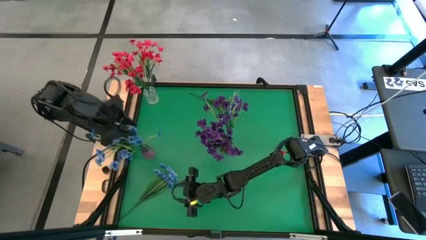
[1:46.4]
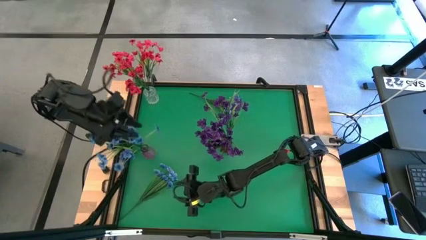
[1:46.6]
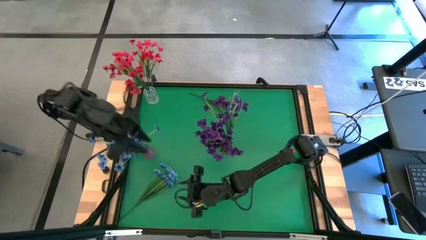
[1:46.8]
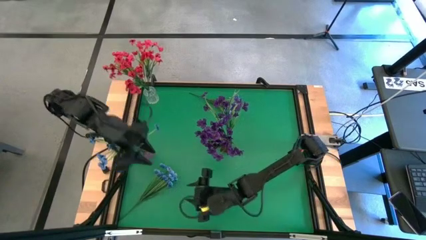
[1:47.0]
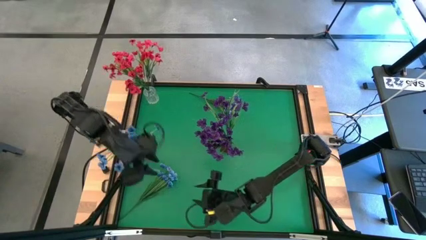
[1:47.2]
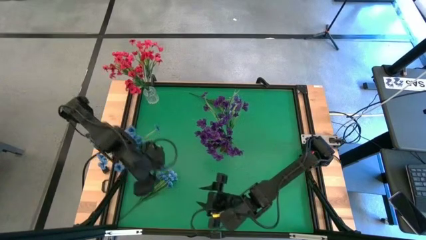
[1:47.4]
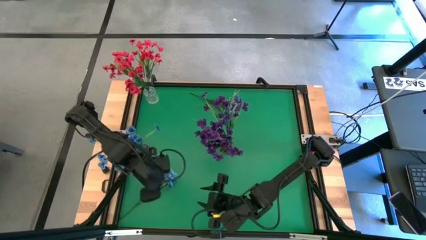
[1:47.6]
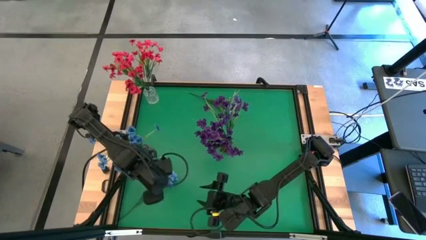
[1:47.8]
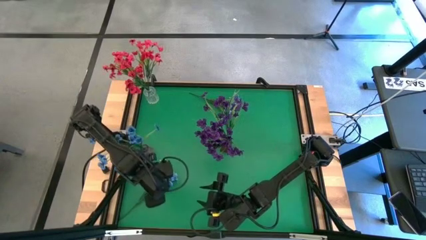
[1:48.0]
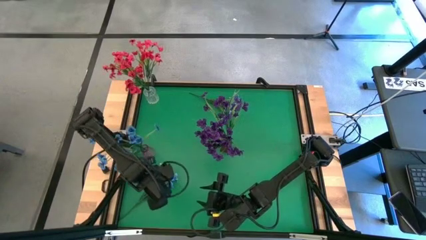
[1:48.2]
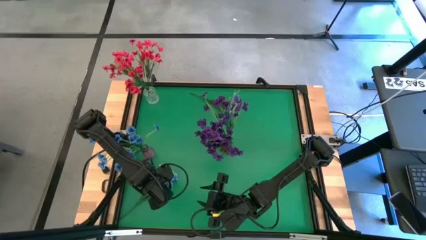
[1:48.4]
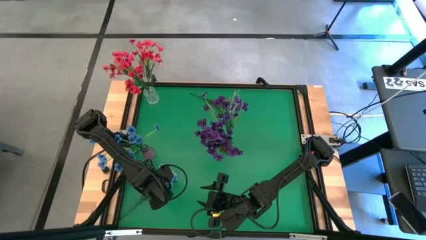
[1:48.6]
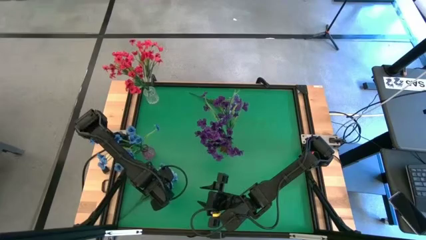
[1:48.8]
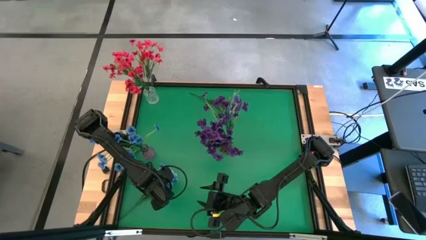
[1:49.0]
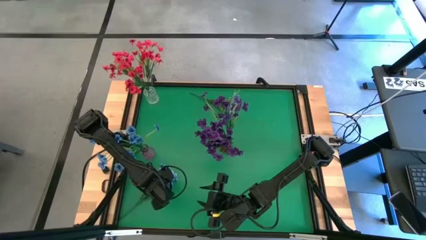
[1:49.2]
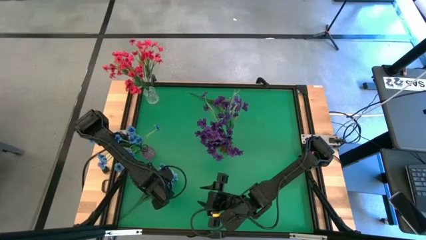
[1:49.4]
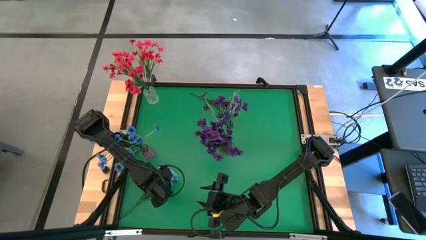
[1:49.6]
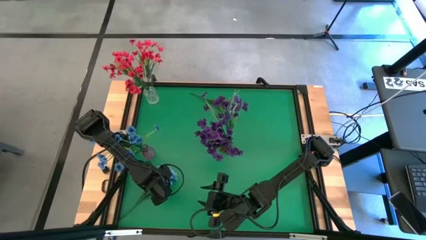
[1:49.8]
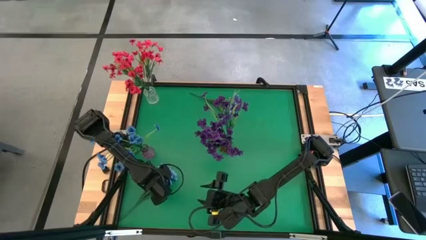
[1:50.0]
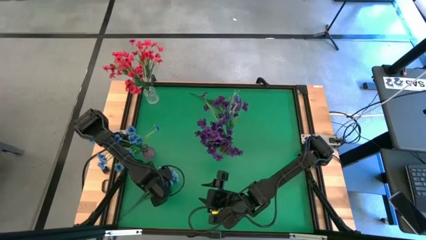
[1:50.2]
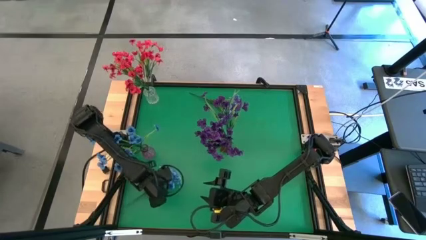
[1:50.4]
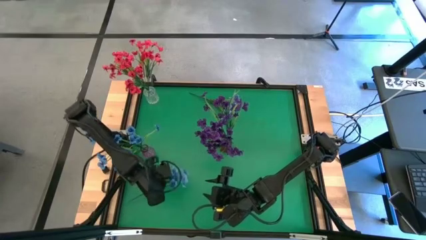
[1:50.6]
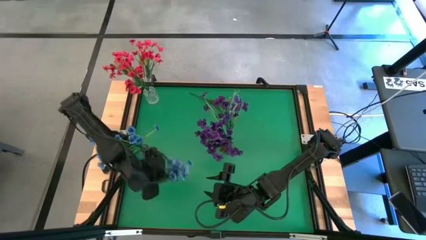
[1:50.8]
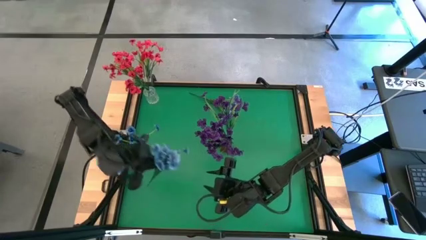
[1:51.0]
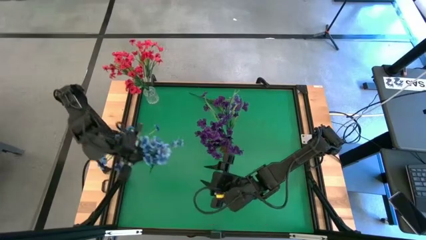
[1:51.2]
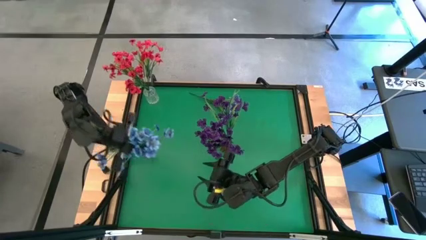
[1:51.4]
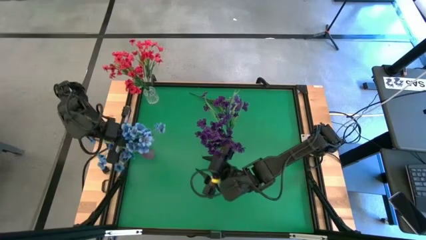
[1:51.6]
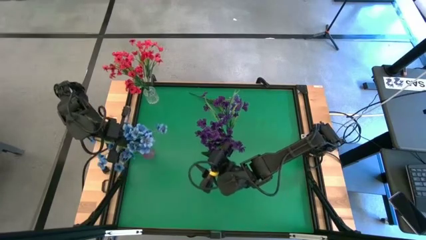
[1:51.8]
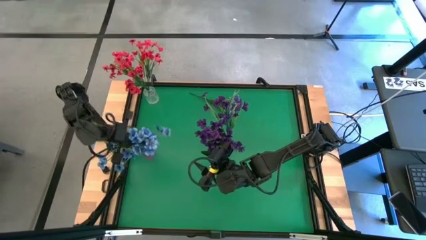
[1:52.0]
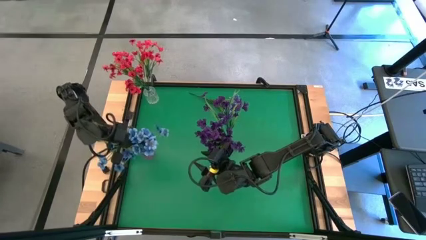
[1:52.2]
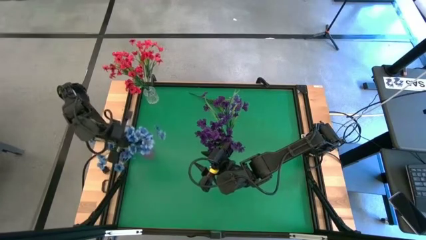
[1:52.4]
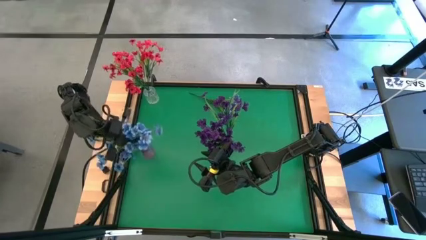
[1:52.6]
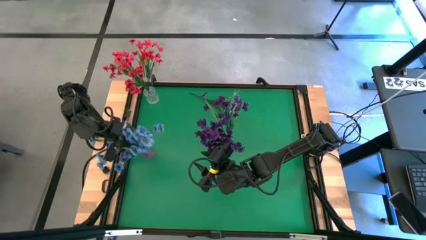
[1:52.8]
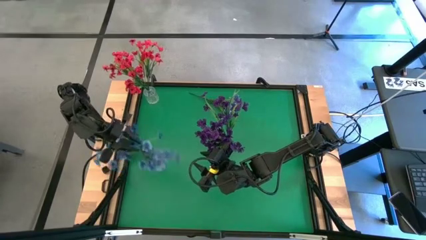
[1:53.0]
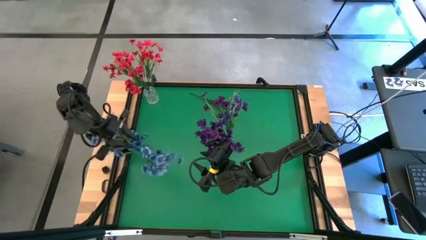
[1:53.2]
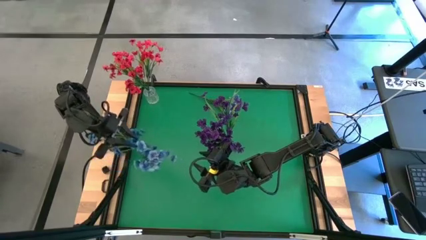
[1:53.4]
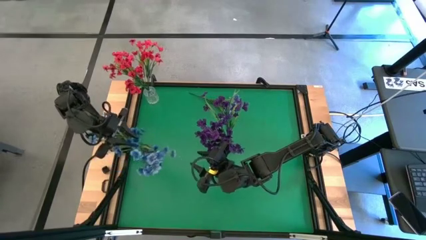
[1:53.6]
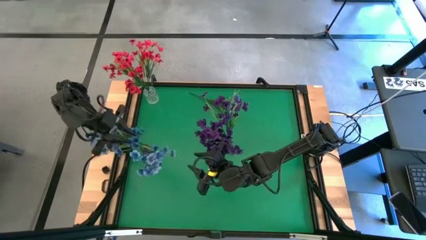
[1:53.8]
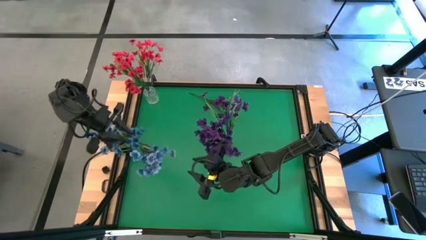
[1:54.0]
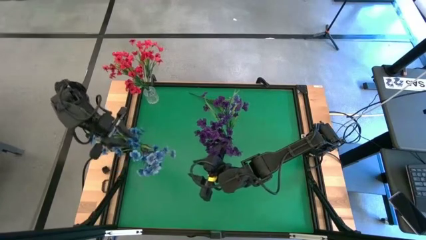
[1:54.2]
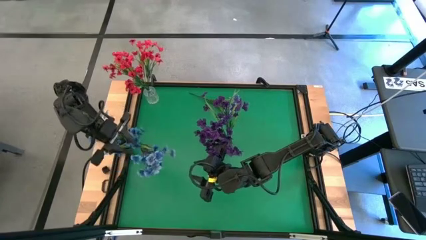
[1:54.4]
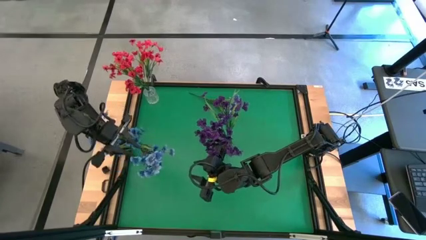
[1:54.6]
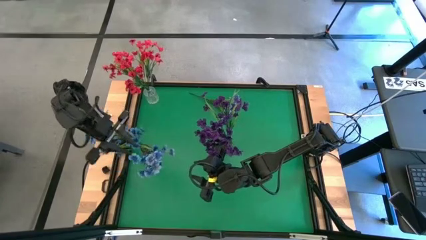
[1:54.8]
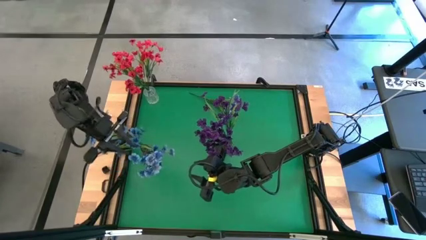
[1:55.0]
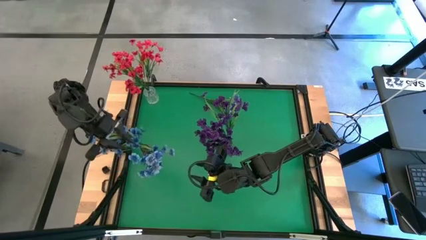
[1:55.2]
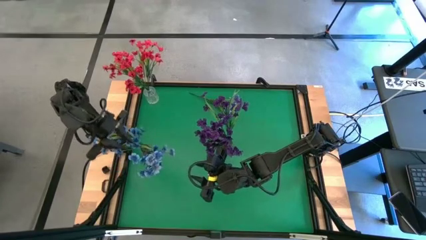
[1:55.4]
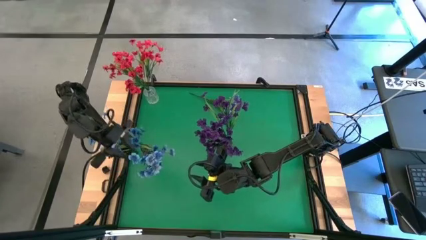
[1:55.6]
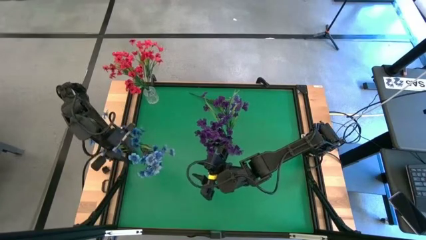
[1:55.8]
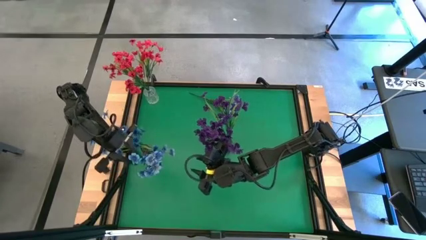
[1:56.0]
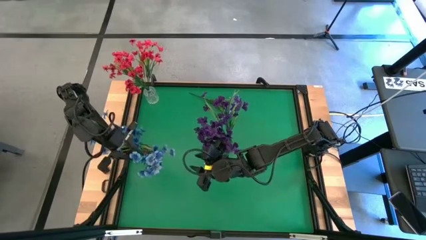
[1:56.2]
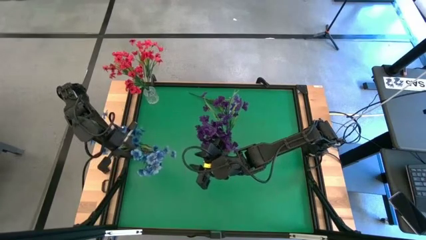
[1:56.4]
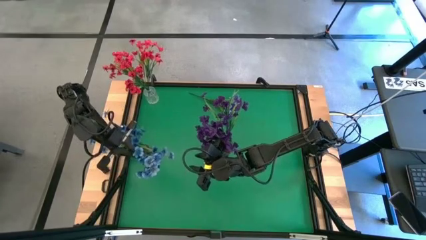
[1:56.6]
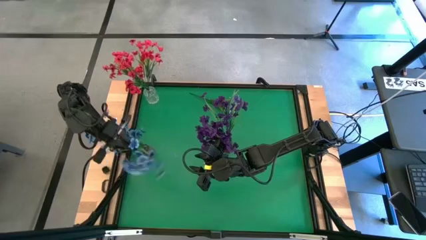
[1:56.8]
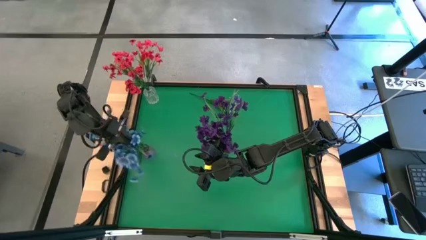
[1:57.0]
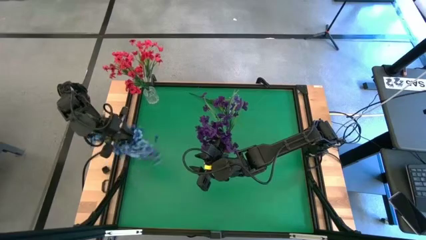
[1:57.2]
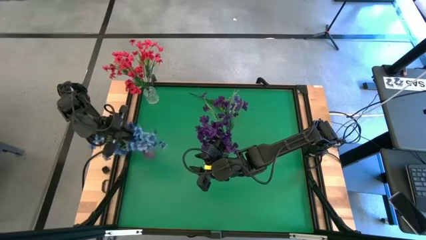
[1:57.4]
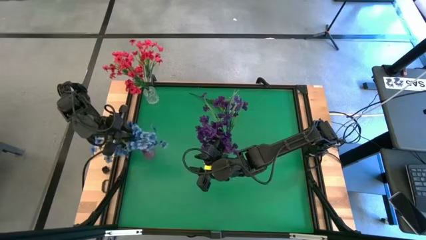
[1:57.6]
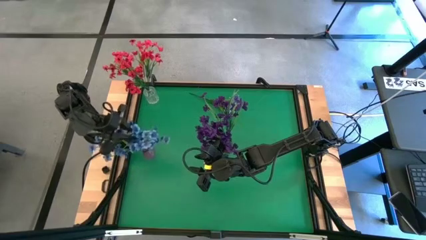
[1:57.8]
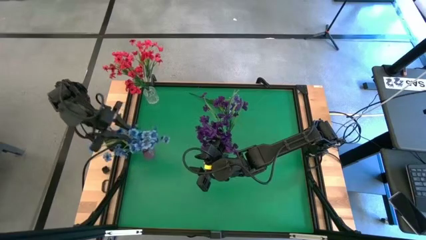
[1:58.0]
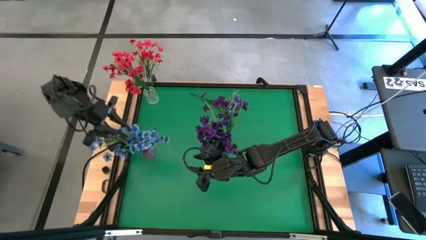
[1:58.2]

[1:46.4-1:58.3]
Task: Sort flowers into vase by color
Put the blue flowers into the violet vase

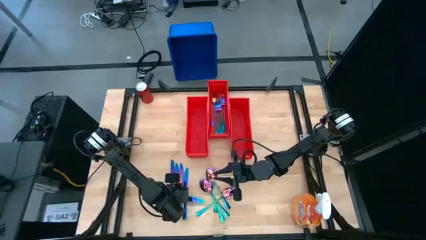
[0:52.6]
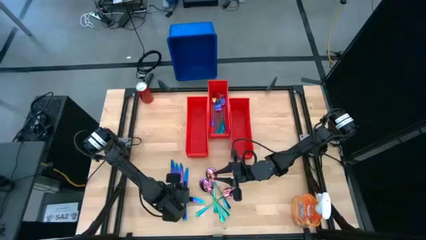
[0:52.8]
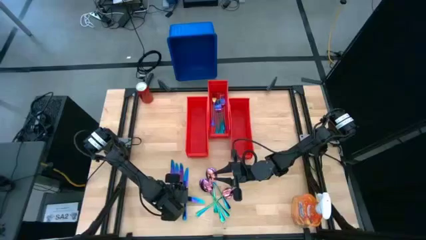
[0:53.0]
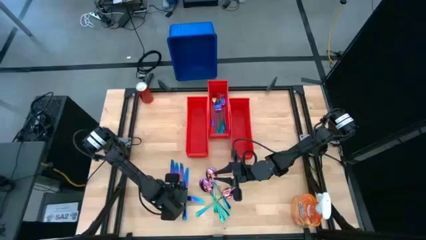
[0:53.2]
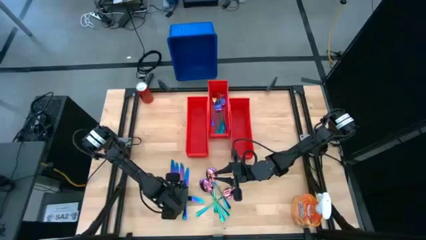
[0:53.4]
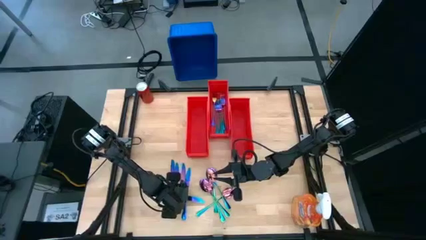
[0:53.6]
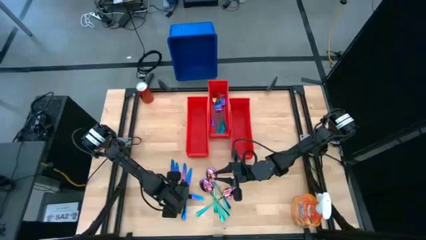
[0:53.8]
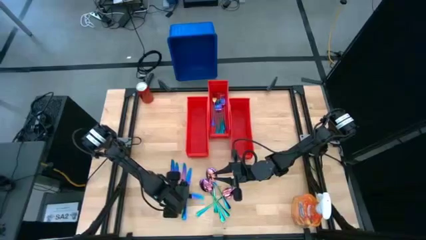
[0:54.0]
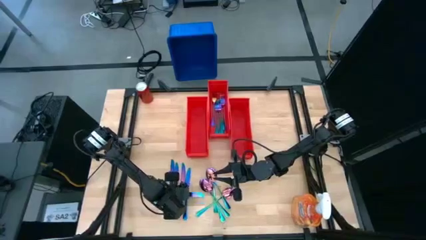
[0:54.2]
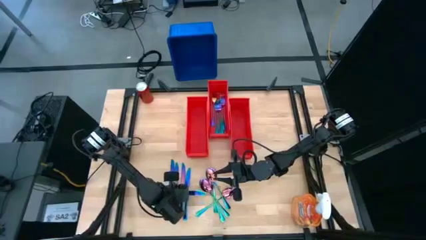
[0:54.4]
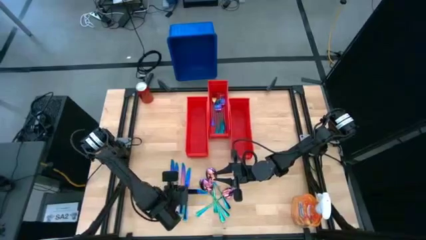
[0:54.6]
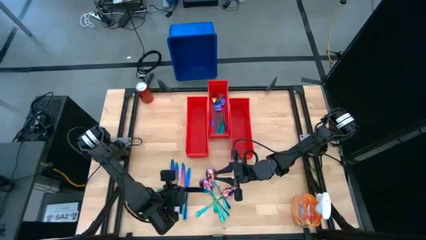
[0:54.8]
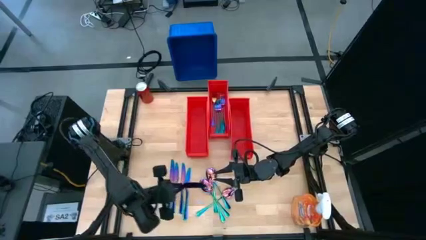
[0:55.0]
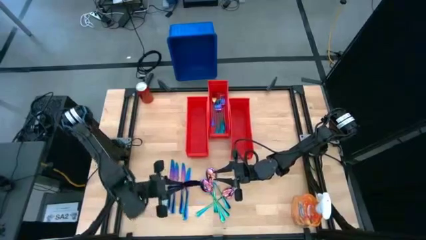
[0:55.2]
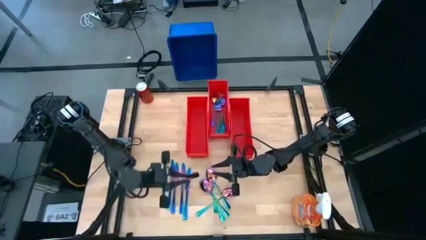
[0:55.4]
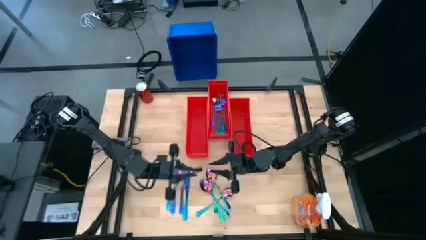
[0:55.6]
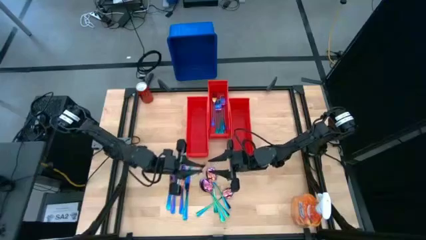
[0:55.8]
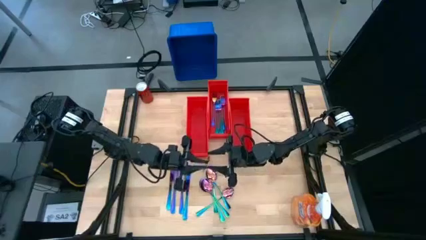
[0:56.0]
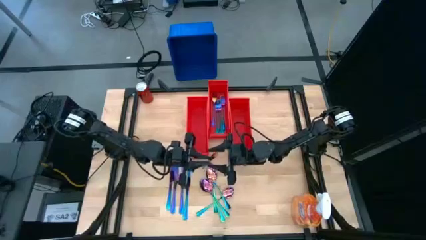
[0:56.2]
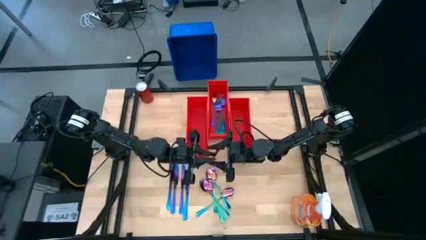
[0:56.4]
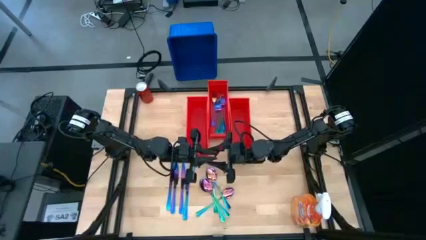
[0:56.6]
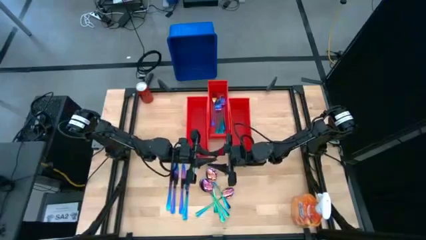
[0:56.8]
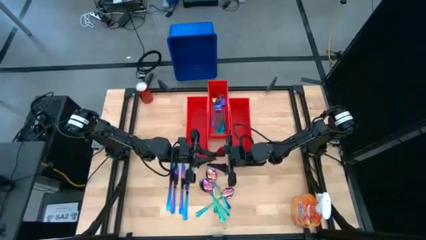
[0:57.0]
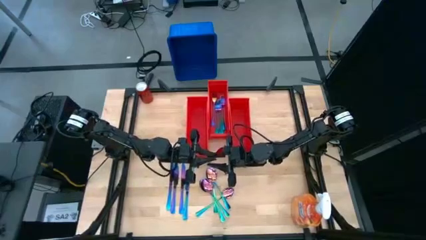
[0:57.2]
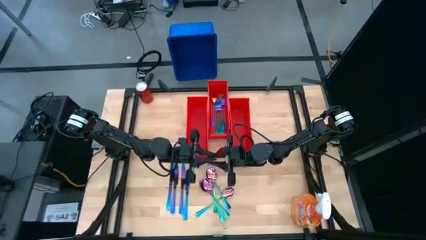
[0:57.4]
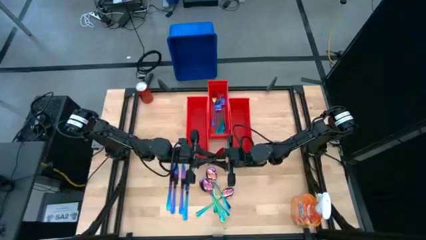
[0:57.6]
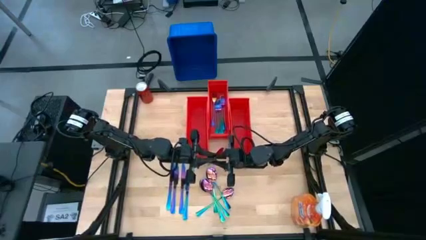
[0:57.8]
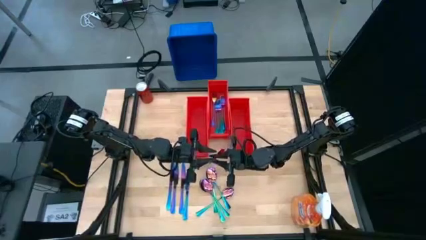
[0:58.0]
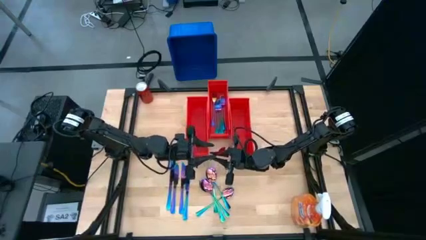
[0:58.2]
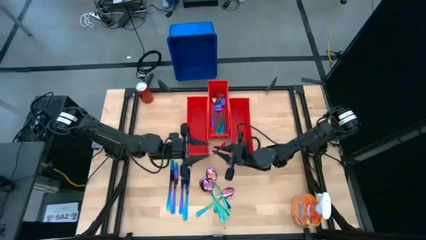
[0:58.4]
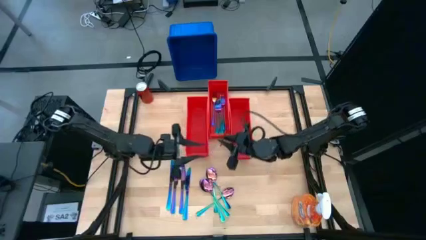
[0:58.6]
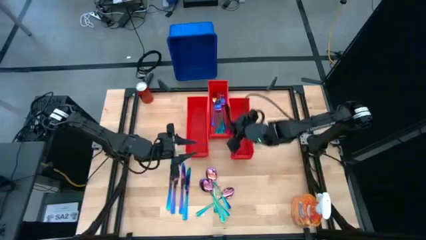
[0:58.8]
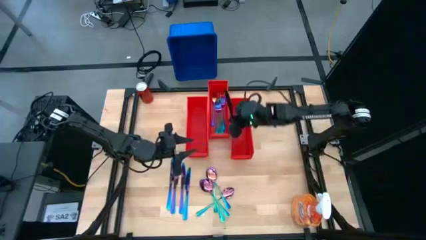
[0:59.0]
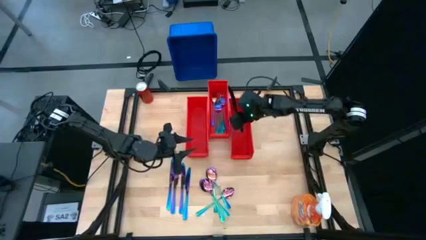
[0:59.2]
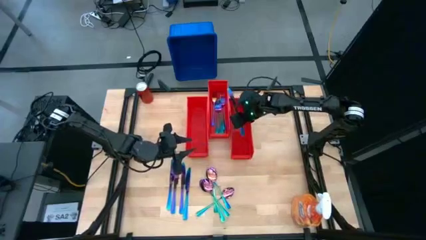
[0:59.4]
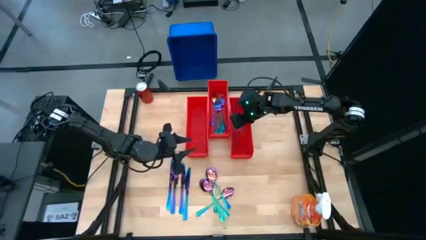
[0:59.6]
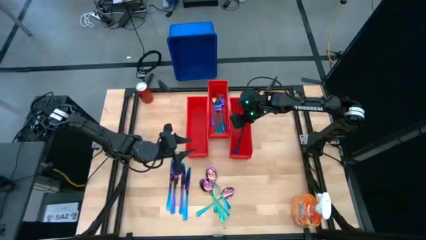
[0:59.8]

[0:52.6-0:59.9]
Task: Sort silverware
Put the iridescent knife into the right orange bin
